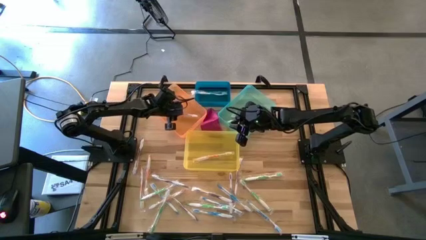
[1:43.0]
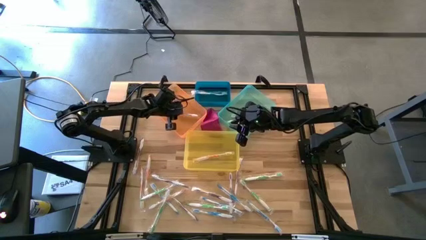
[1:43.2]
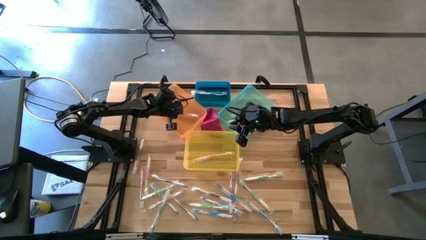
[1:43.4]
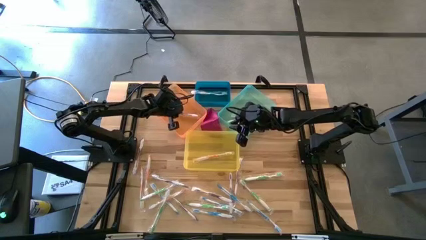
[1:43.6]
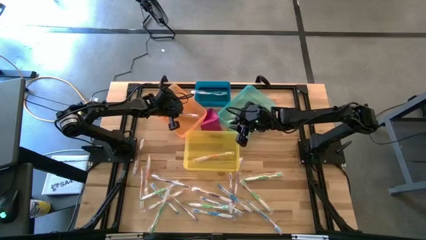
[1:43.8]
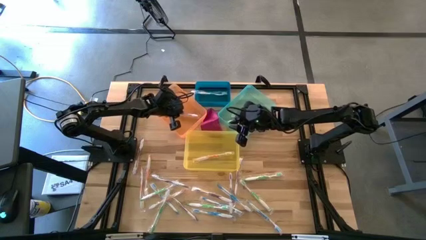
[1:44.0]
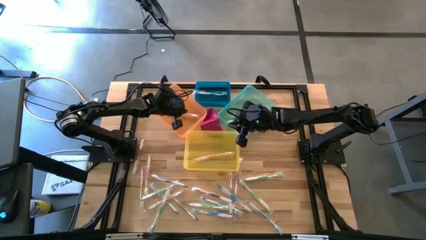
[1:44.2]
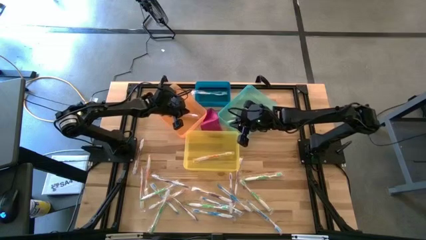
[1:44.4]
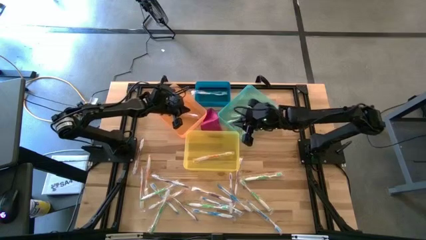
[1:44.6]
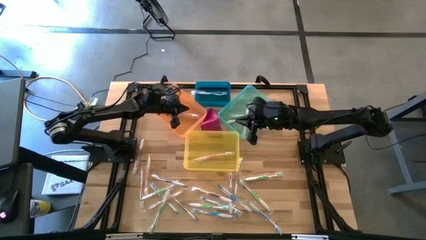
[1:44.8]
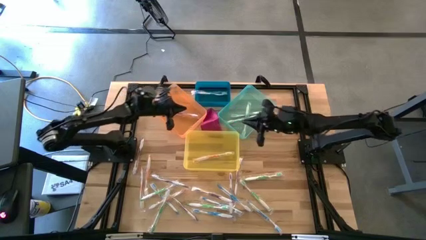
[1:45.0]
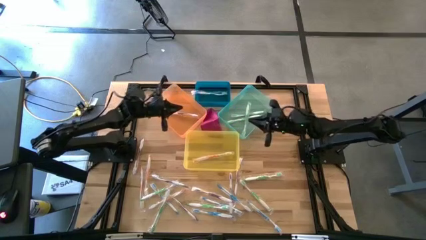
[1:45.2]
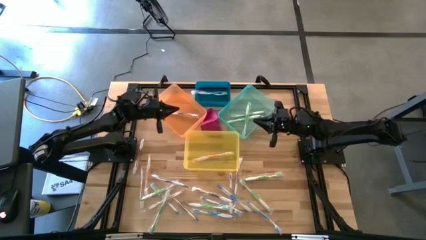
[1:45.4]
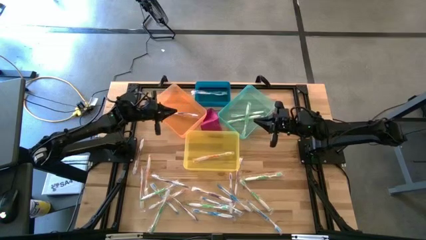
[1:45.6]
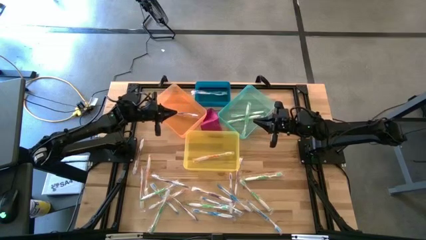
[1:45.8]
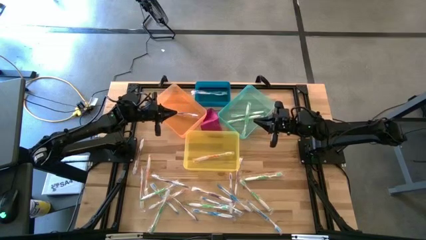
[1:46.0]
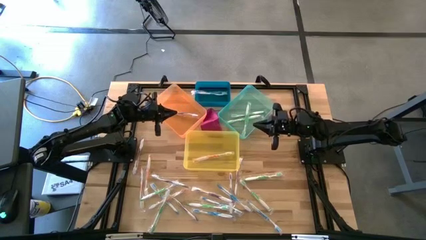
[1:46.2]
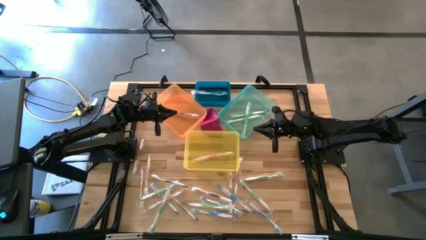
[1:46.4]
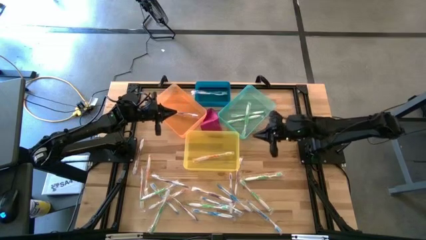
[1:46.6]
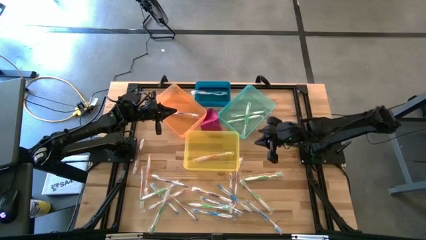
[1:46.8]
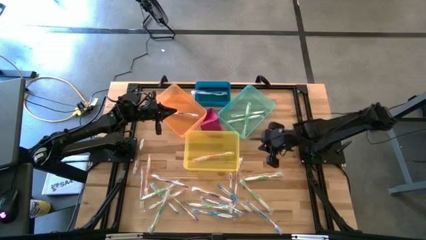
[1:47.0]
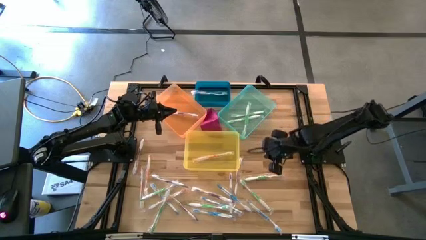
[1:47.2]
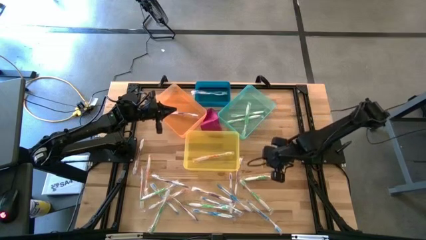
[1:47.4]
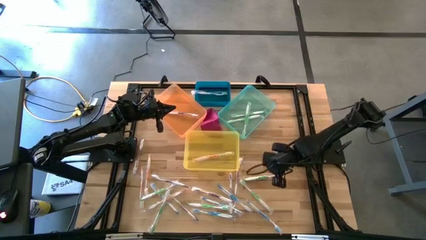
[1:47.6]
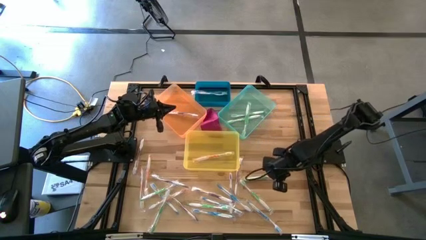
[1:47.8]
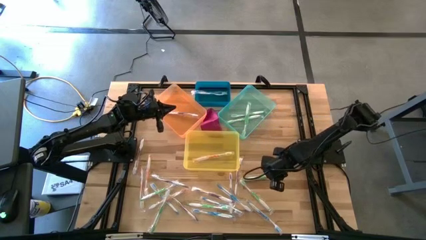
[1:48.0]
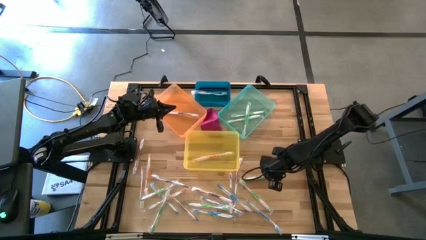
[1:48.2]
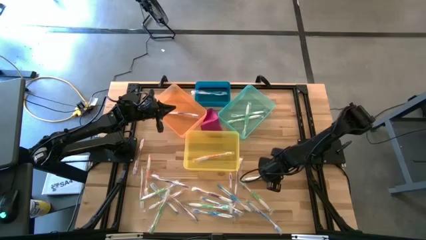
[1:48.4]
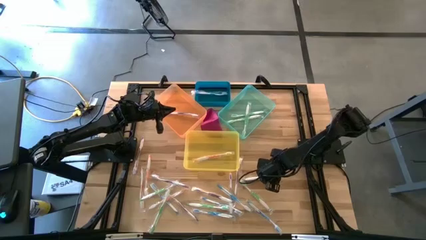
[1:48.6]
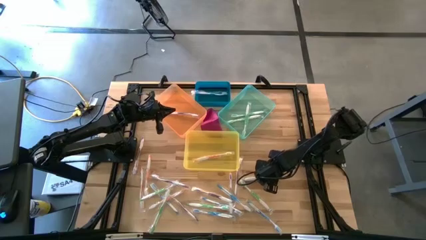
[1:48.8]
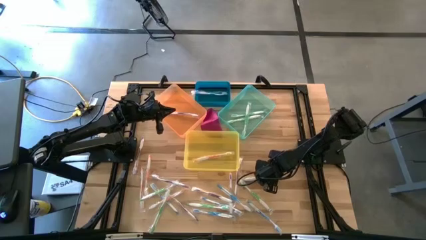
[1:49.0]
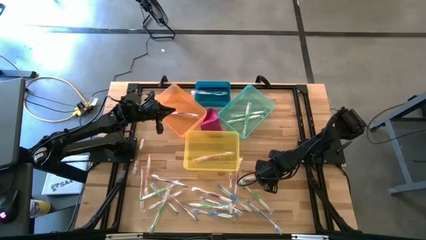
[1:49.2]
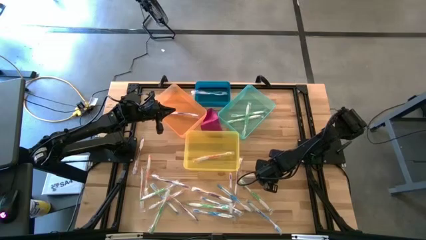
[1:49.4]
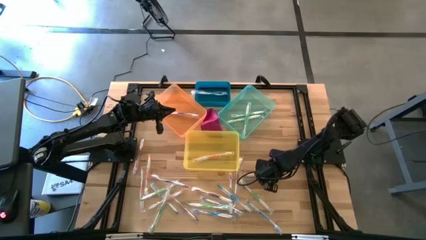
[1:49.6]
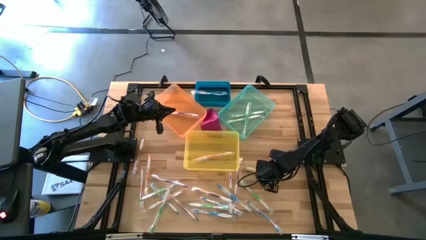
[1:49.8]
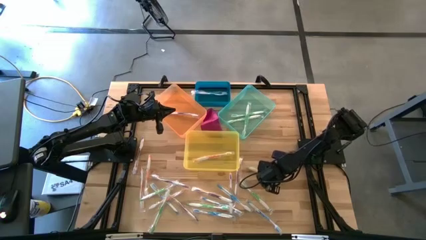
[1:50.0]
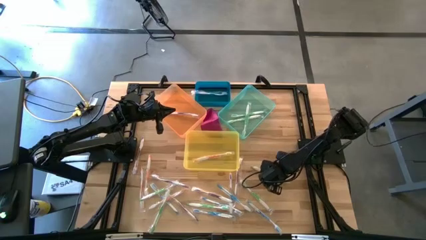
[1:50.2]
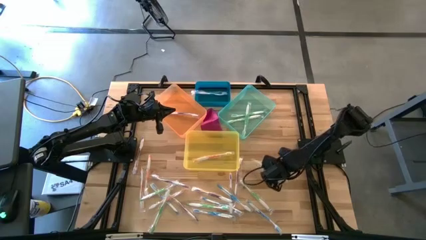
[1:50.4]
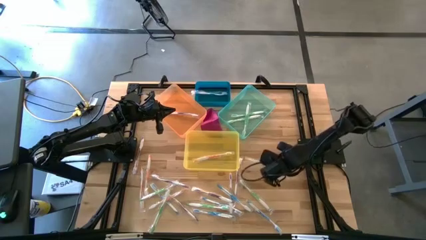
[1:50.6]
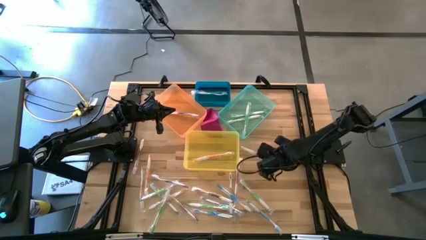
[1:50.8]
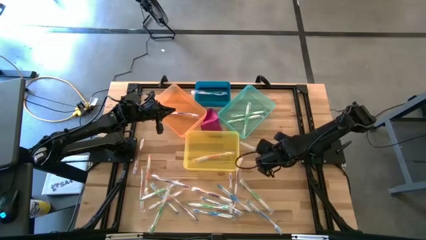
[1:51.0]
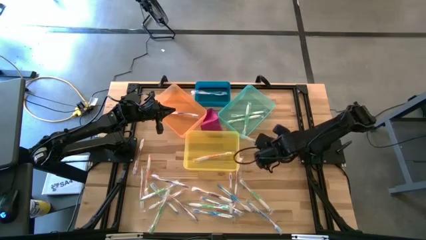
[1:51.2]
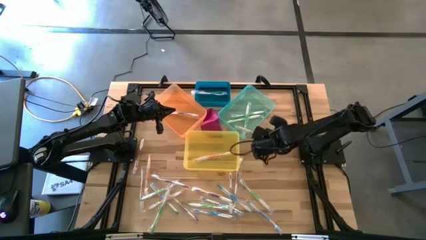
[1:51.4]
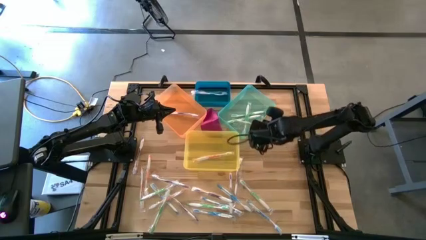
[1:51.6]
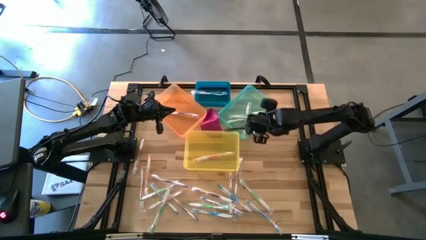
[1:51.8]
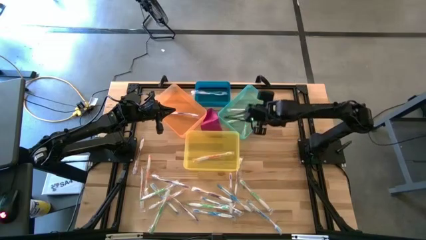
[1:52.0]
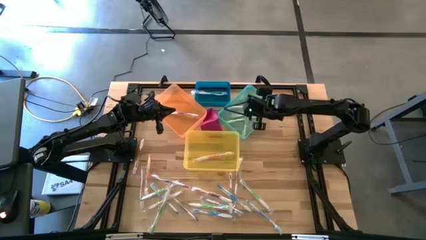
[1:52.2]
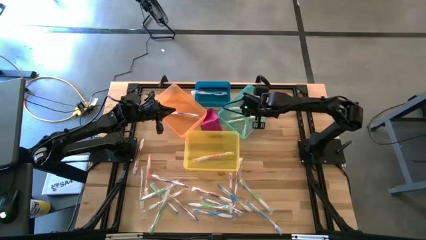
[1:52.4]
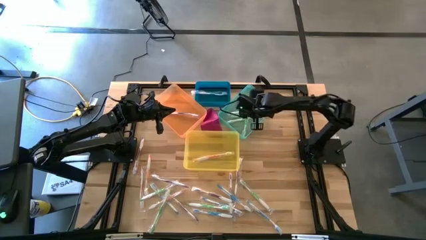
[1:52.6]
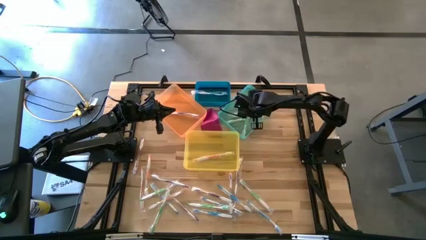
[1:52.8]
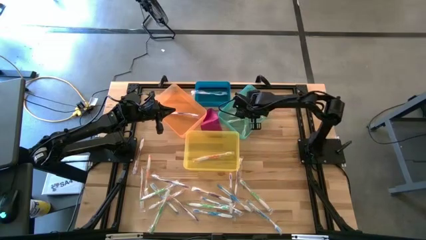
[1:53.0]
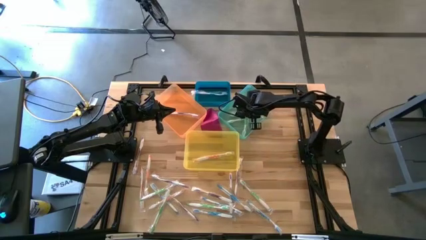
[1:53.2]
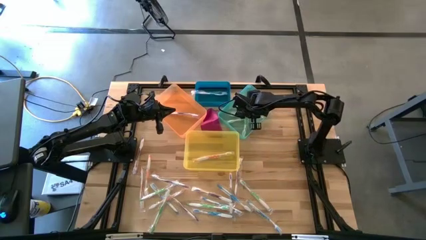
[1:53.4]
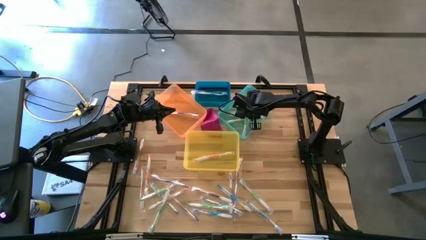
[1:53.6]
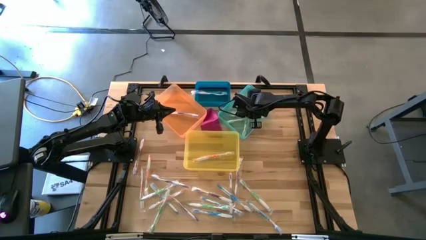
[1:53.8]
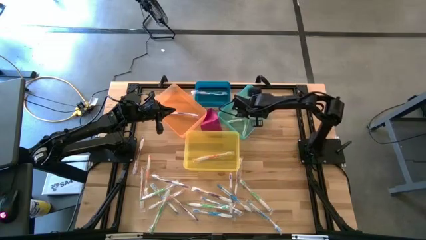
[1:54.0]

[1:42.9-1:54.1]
Task: Pick & Place Toothbrushes
Put the green toothbrush into the green bin

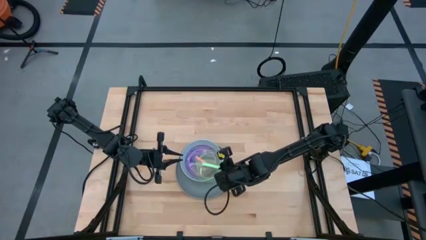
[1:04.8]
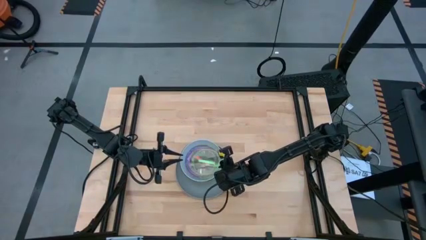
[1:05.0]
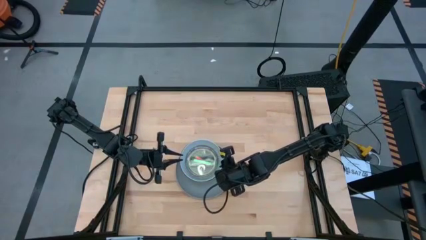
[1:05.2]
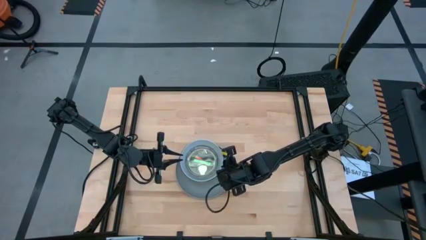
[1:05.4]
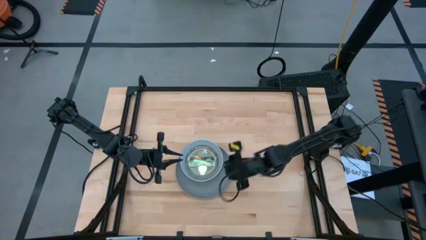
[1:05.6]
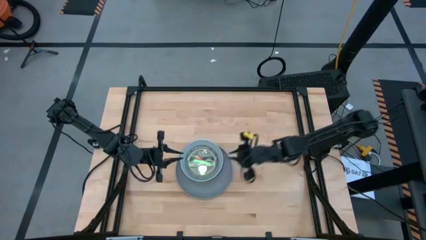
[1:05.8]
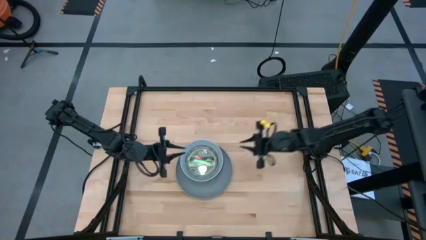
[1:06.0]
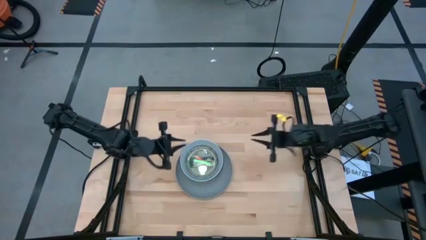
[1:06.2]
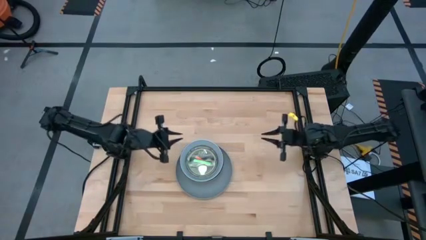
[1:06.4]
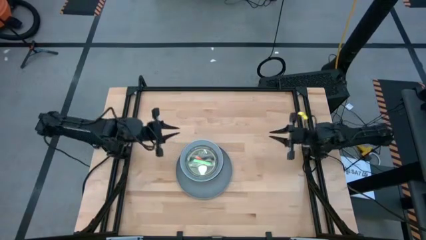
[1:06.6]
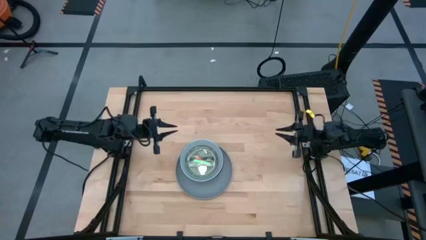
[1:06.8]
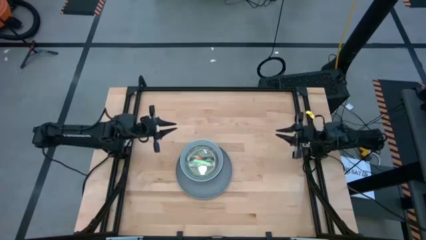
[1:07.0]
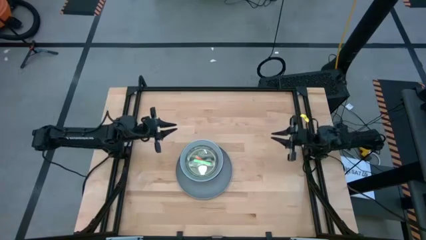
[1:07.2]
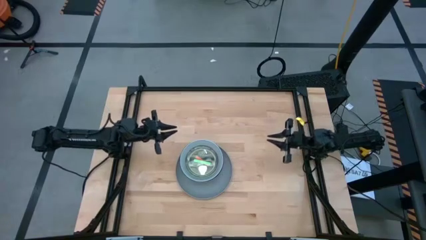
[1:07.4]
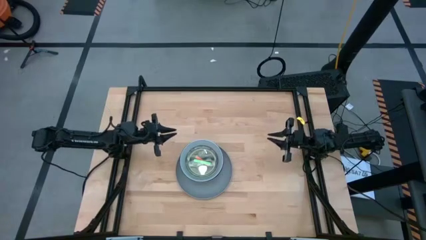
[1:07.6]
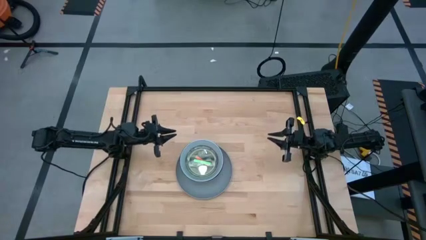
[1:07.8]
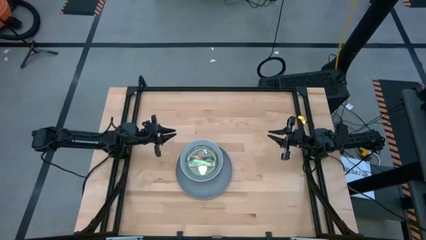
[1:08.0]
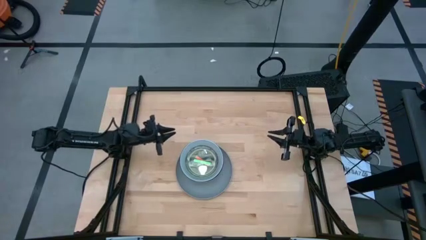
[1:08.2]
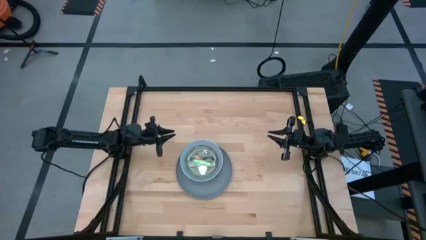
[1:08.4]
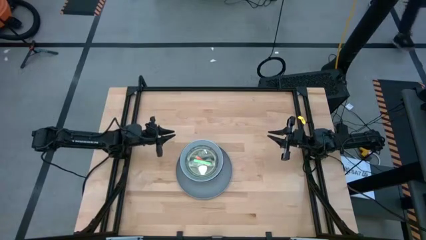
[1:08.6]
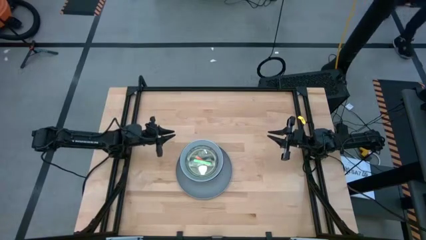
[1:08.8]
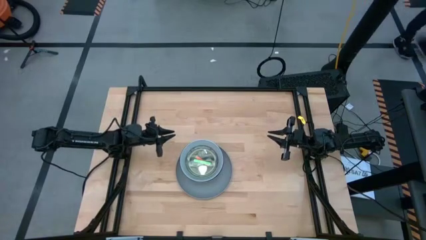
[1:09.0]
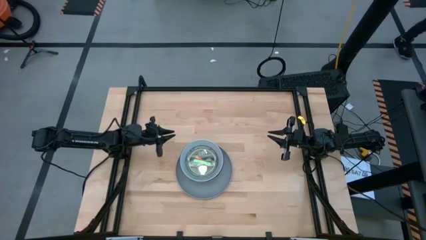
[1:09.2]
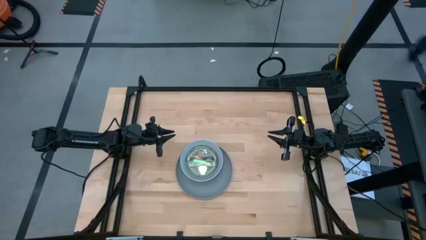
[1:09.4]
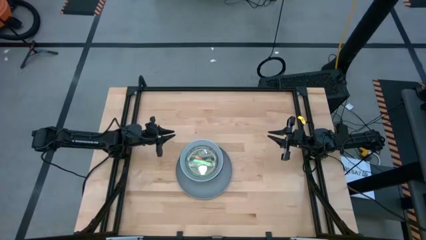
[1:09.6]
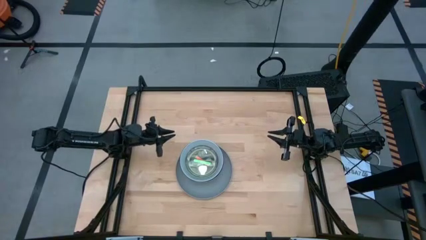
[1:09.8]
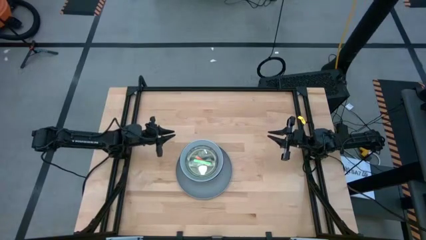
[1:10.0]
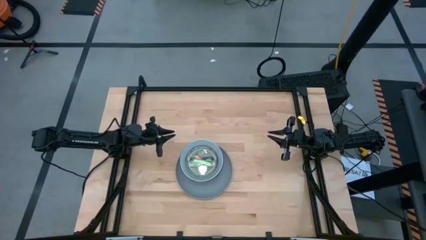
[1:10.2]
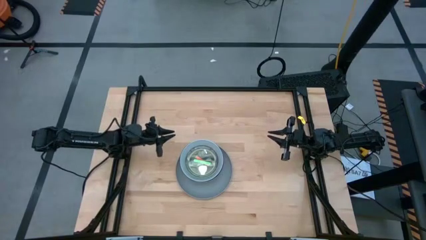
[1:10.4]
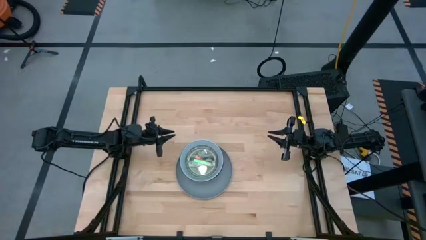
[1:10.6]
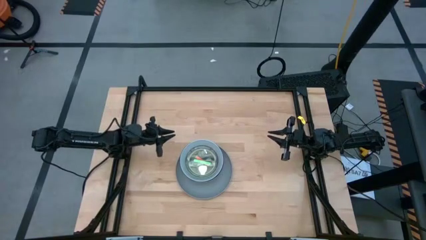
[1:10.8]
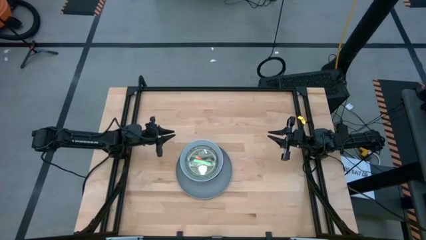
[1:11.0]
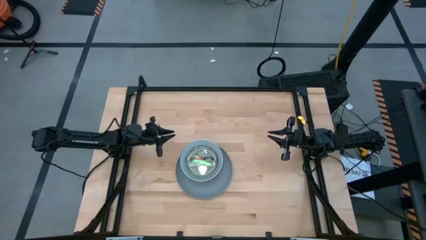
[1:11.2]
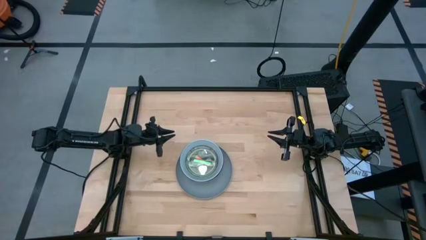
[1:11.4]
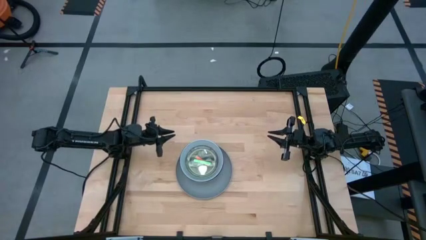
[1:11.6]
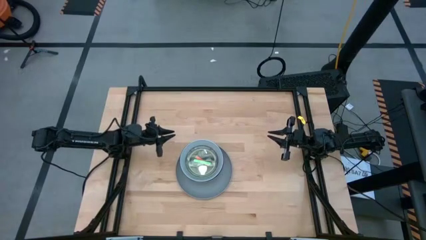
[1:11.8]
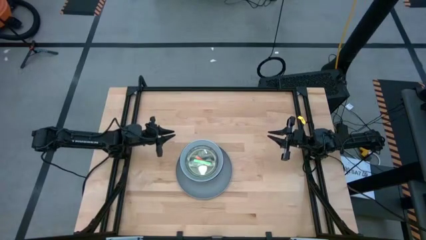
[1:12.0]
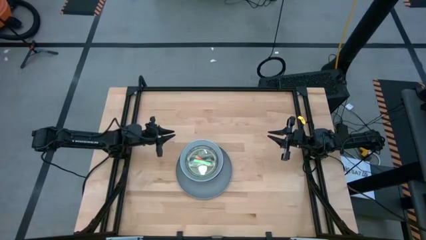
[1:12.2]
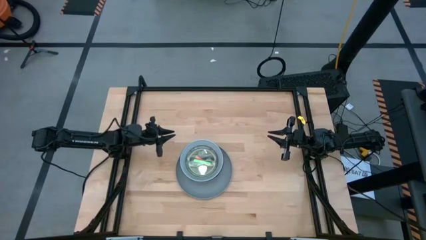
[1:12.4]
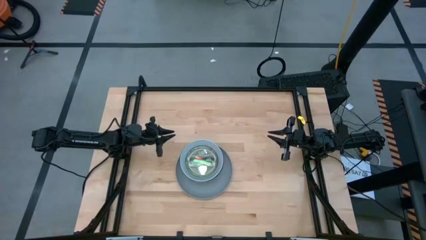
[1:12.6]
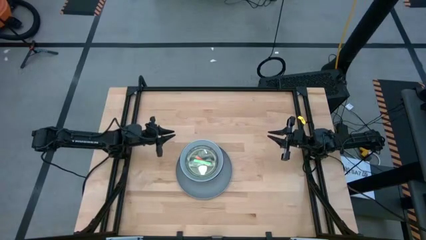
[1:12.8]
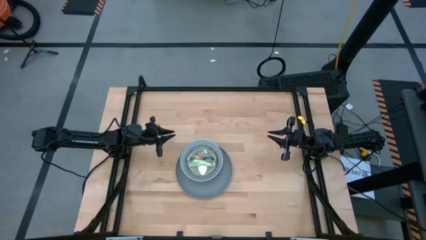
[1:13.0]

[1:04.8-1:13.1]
Task: Stack plastic plates
Return to Home Position
